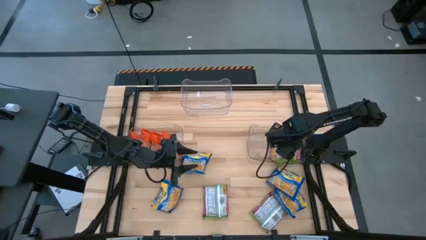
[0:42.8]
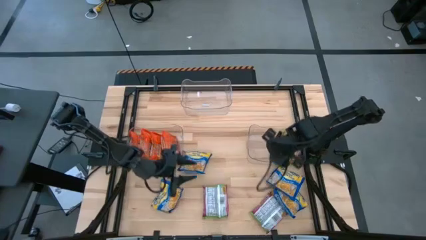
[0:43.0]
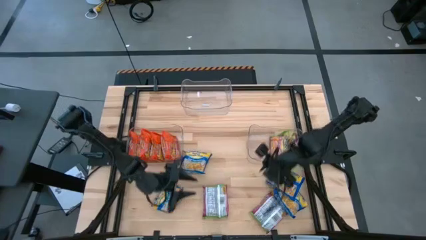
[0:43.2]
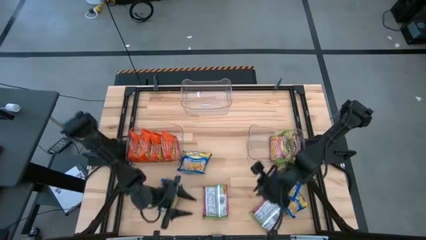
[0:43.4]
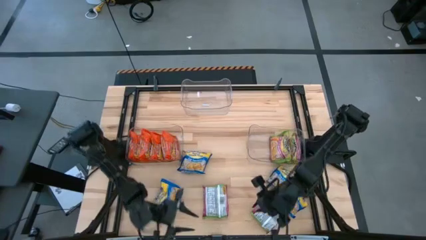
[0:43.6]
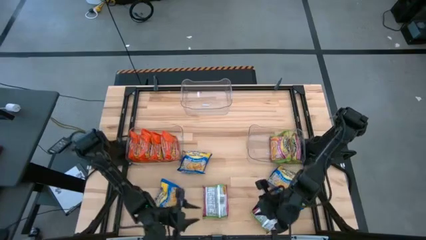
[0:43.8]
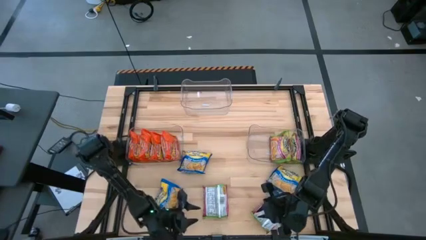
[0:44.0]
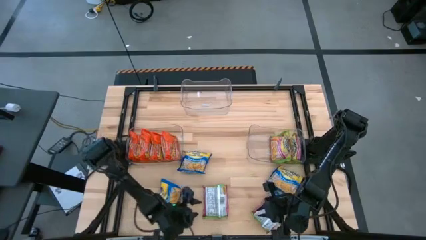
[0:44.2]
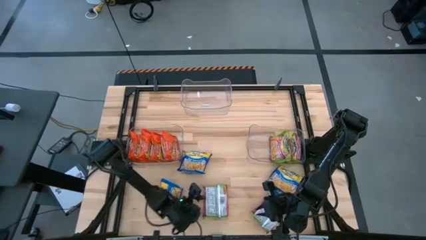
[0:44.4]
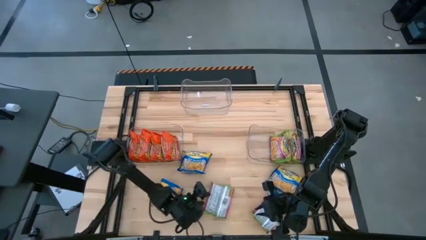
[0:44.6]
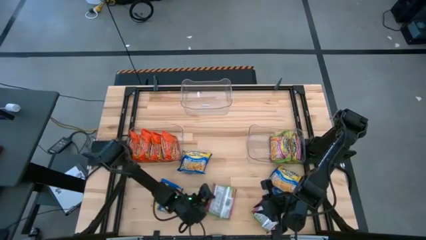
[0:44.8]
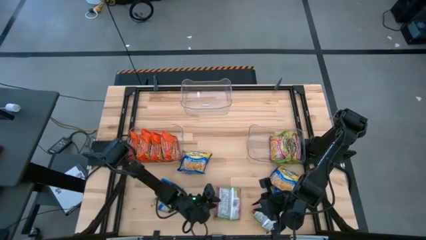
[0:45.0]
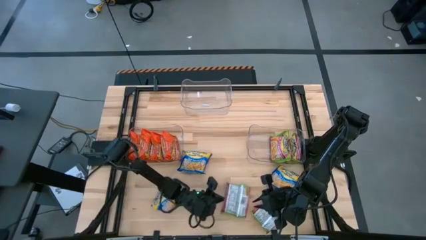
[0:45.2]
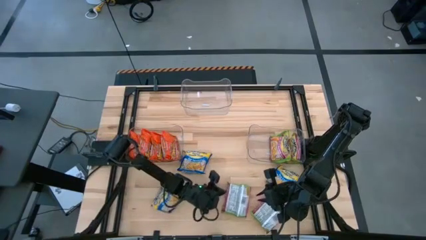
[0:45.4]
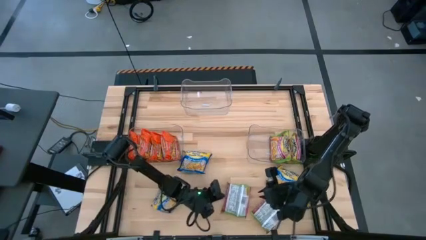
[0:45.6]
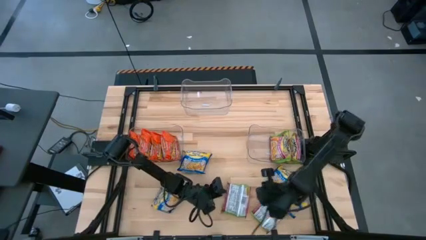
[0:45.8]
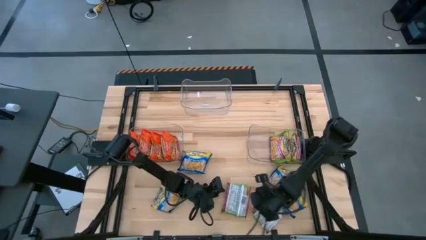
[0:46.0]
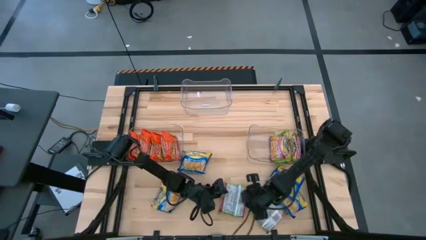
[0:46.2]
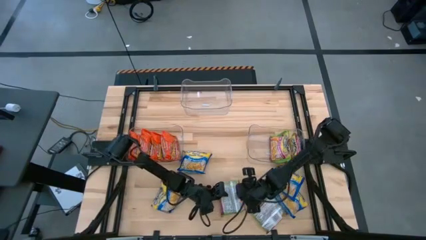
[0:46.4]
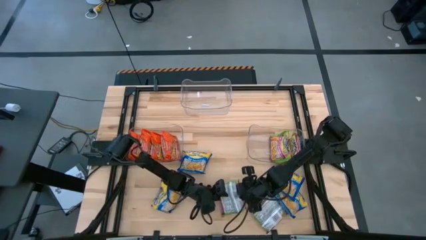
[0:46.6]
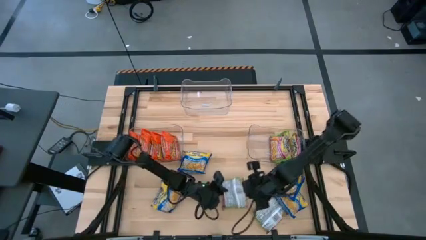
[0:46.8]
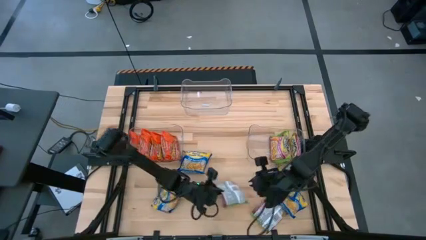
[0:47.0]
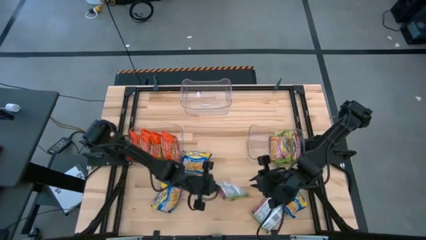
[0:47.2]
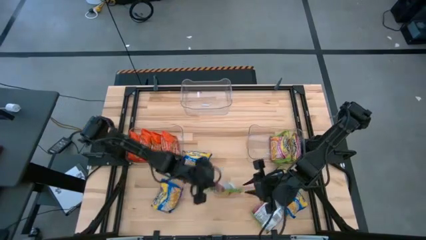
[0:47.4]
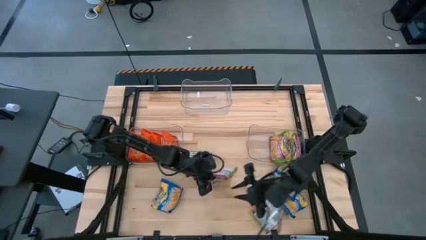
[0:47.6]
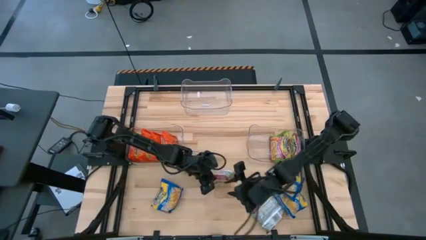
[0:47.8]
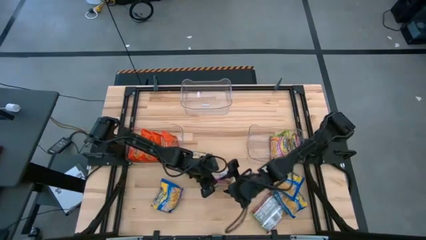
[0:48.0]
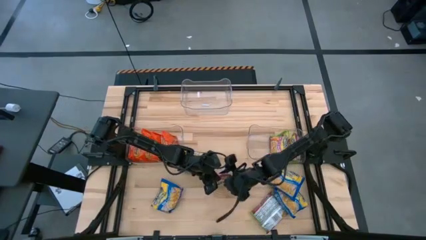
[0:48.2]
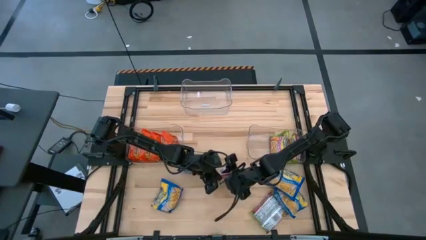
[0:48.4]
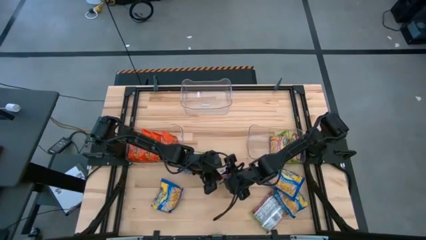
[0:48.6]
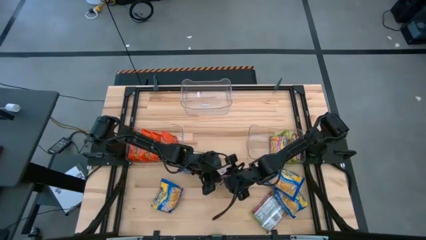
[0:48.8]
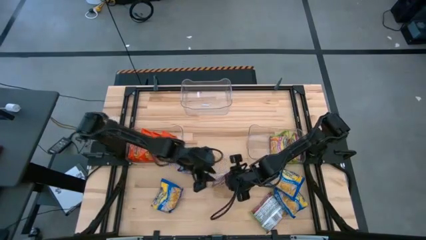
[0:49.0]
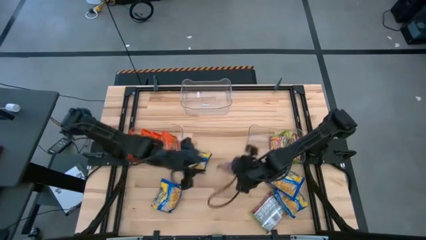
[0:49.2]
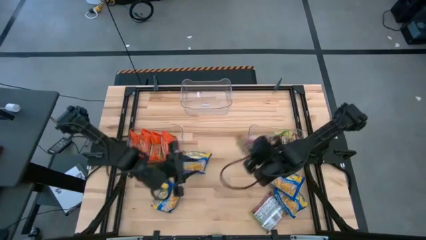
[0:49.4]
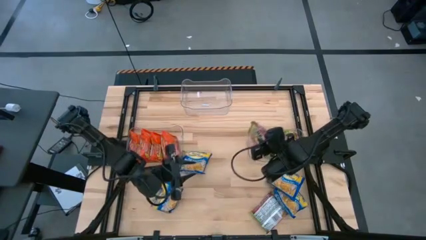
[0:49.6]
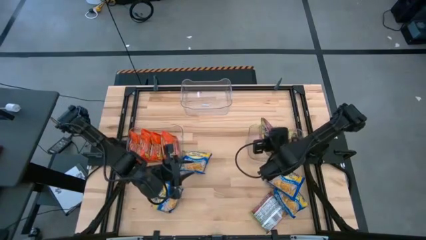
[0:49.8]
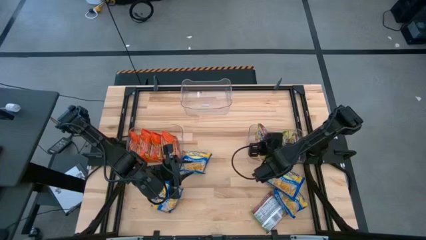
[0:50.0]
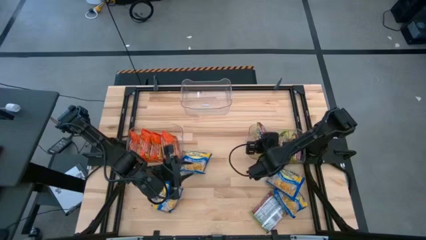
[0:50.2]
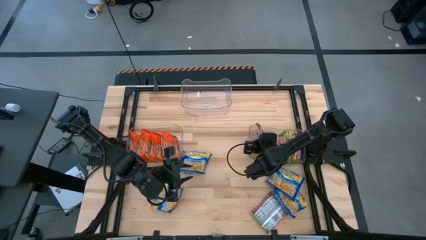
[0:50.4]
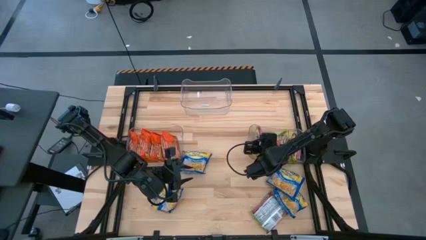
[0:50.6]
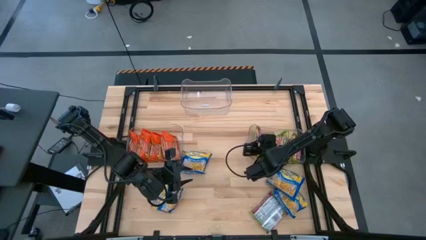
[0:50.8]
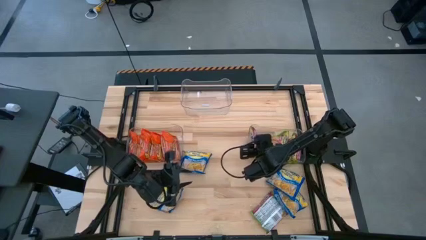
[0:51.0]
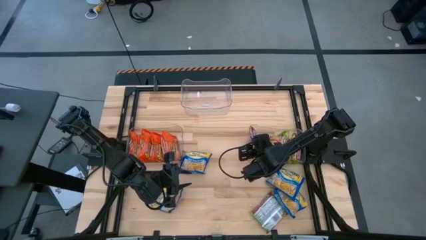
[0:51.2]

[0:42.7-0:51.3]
Task: Sort Maruchan noodles
Put the green noodle from the center bottom into the middle right transparent bin

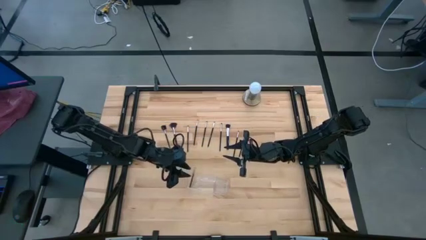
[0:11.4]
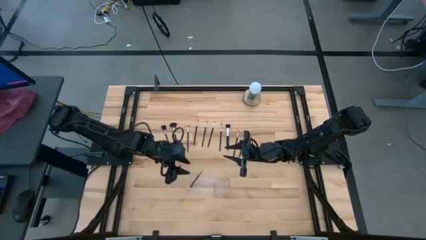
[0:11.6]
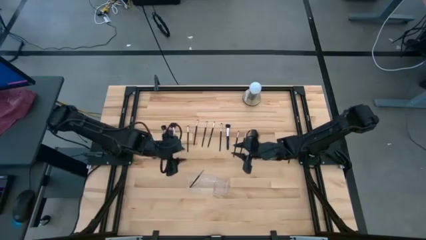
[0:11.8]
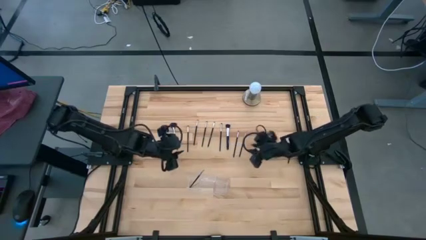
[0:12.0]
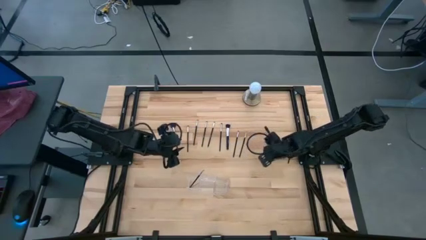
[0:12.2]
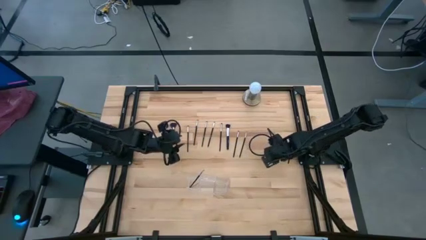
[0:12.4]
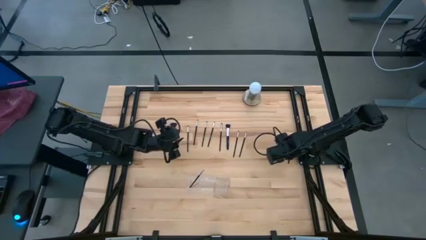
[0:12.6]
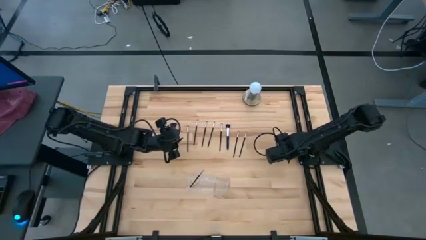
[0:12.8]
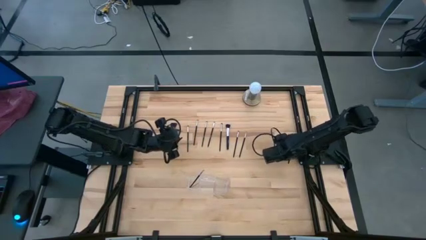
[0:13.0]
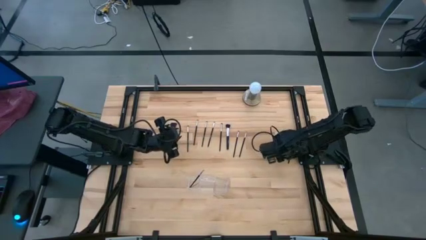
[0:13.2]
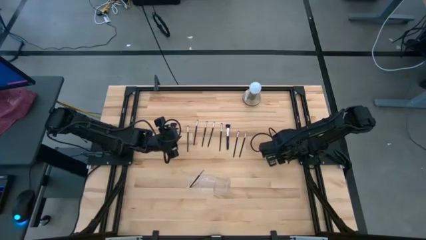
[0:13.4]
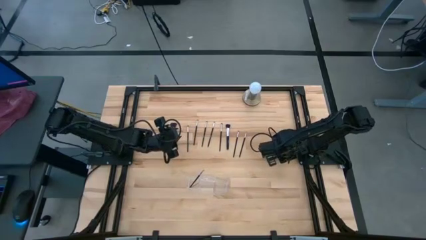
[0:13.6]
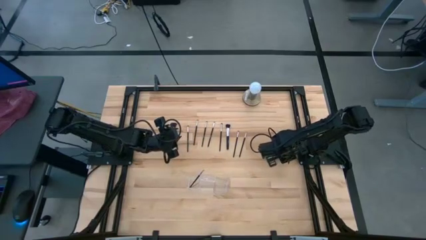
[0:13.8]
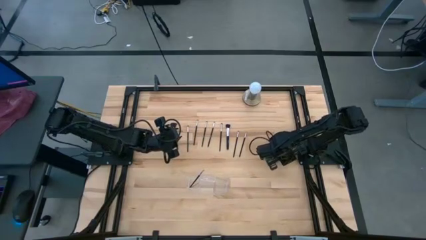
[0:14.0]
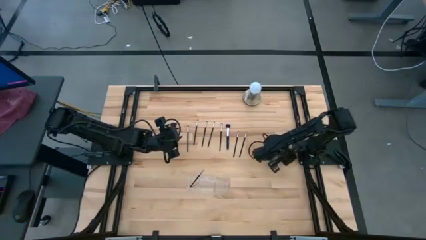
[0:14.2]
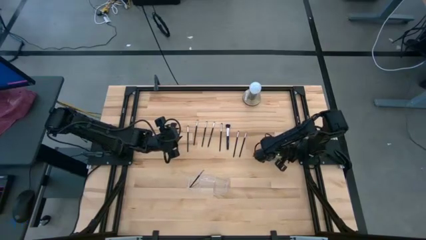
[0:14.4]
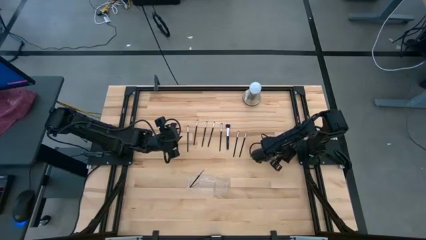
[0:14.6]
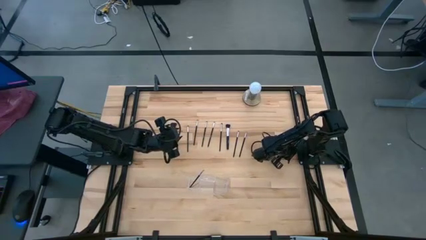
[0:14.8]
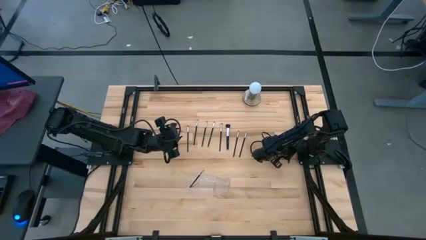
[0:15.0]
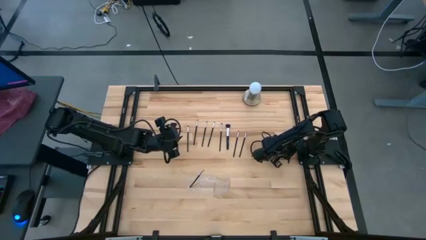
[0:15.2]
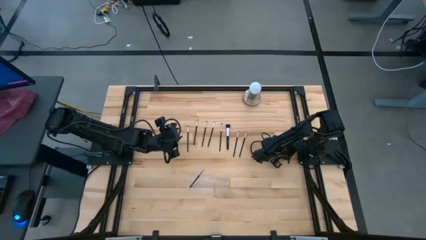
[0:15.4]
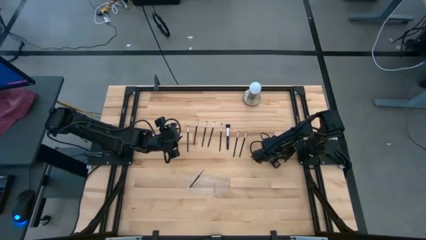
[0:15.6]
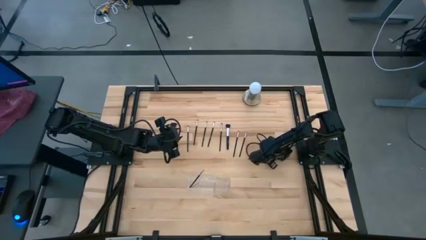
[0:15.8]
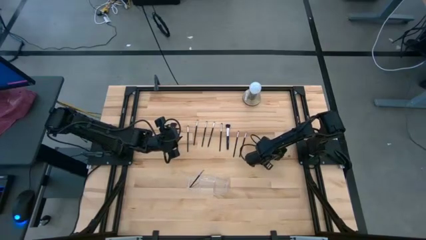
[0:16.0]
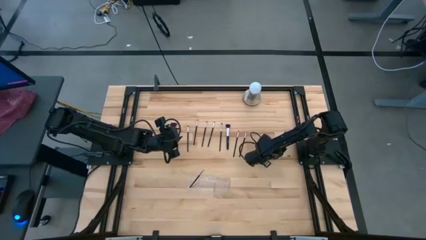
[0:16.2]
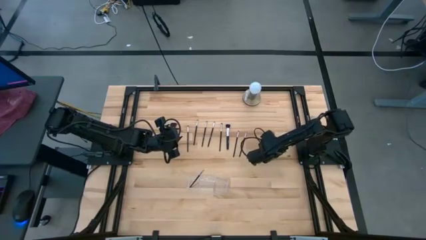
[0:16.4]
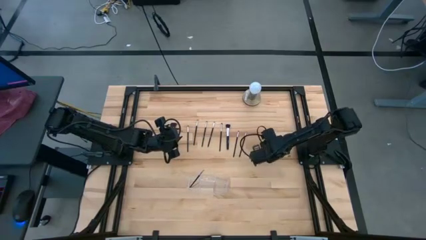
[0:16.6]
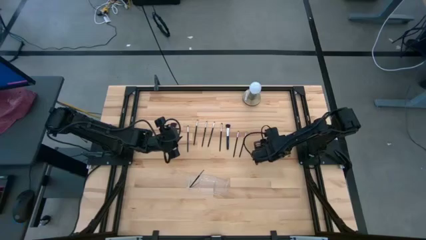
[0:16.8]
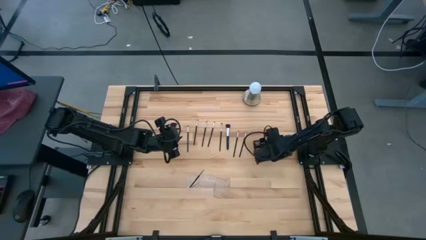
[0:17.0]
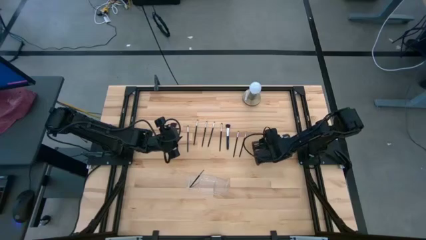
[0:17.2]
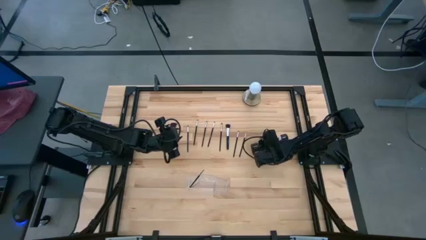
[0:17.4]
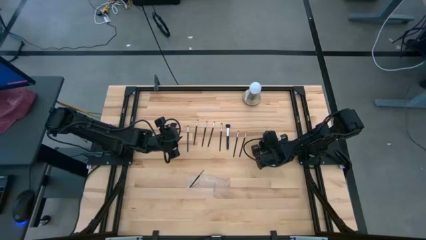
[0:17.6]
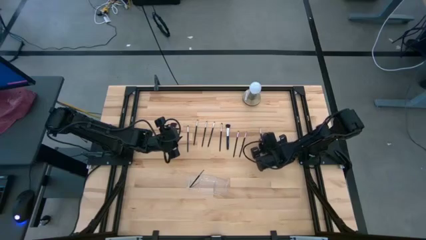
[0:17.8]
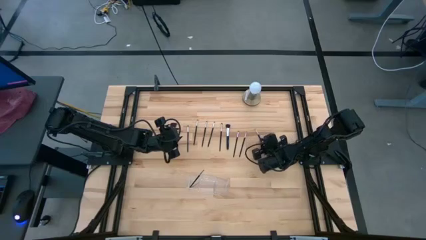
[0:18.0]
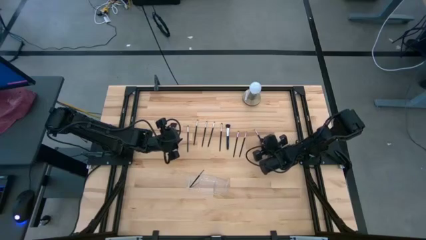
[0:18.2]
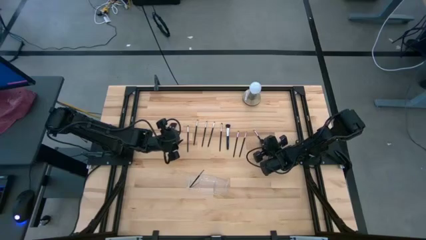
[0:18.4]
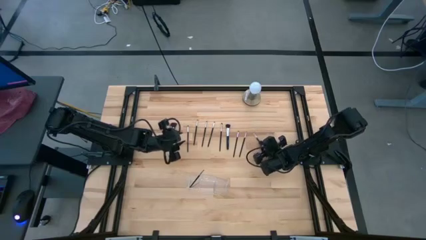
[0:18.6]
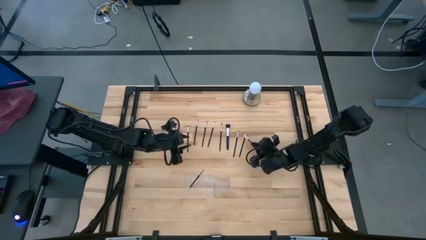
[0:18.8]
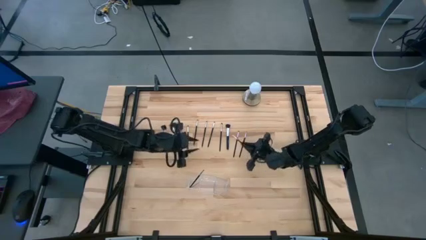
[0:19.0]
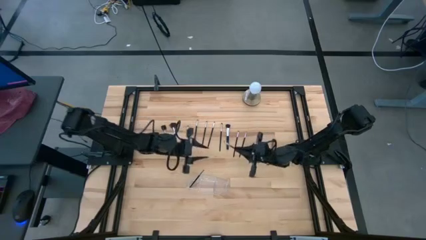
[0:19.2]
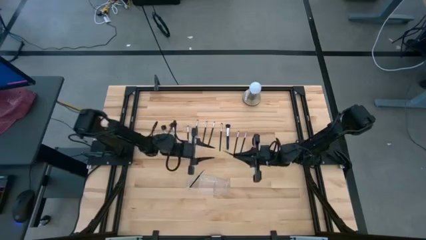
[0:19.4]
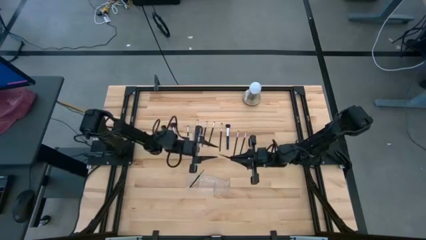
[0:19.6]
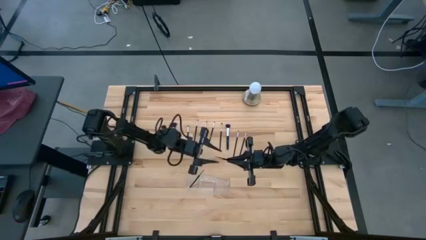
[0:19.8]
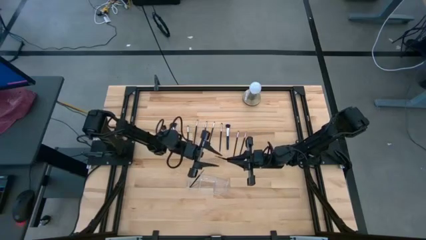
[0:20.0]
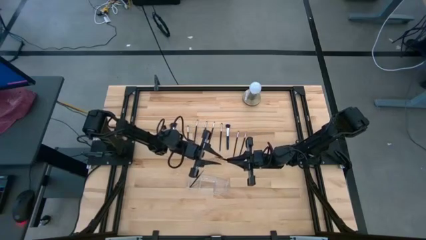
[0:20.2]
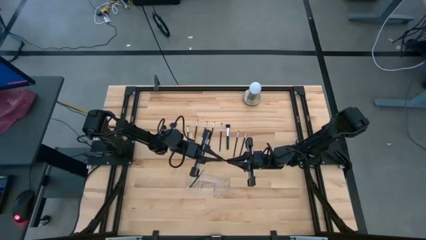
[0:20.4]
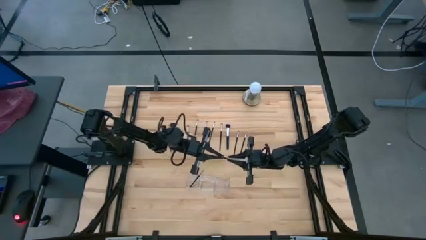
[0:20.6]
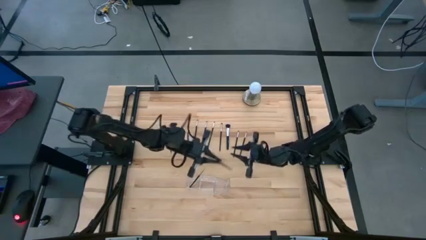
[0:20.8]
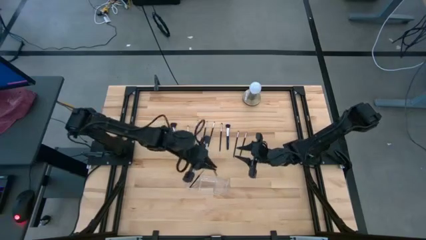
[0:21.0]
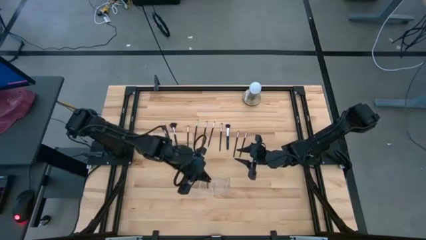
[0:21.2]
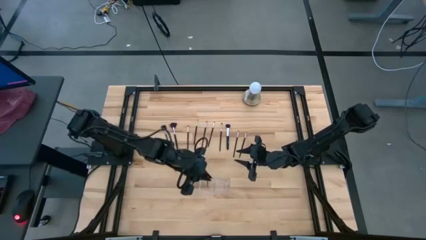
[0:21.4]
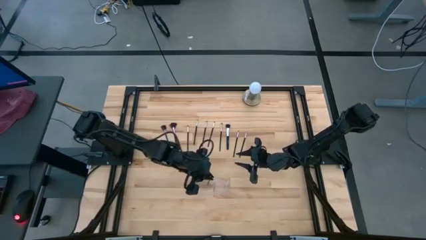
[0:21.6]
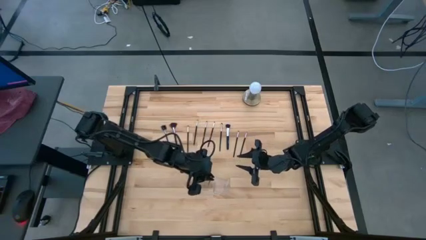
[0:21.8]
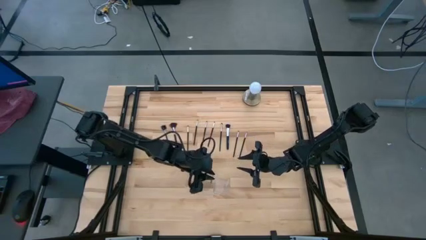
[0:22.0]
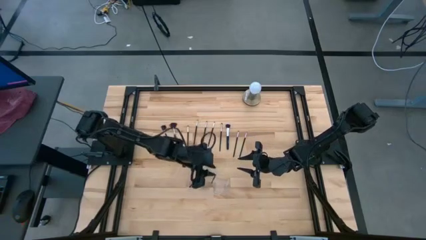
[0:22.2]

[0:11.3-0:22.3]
Task: Put items in baskets/containers
Put the black eyeshadow brush into the transparent organizer
